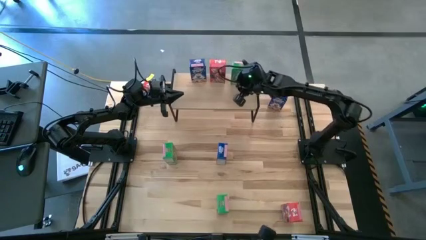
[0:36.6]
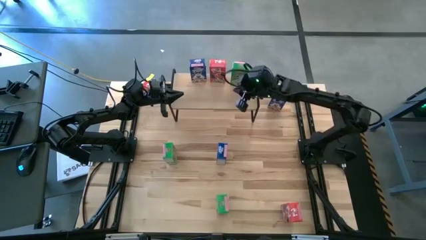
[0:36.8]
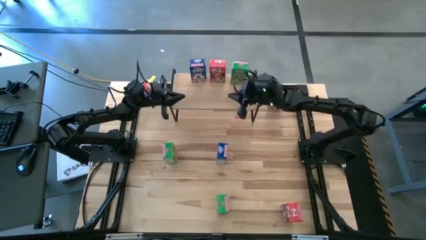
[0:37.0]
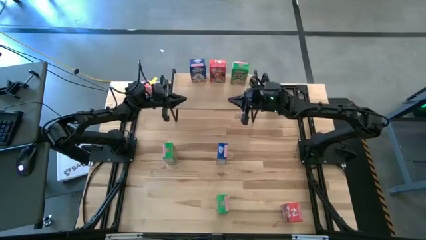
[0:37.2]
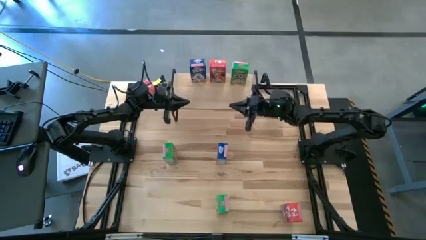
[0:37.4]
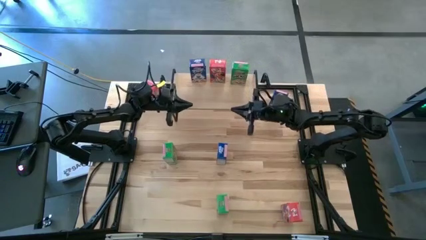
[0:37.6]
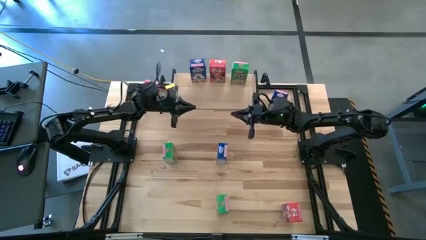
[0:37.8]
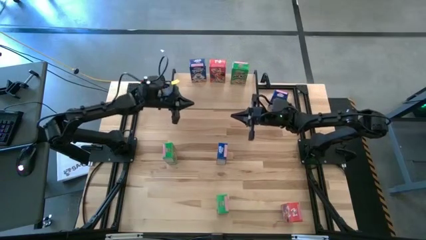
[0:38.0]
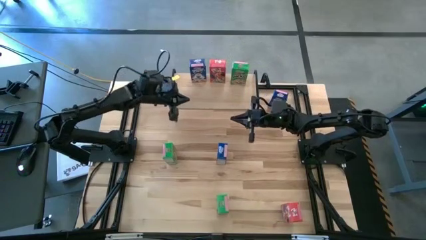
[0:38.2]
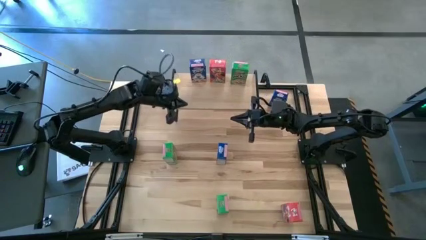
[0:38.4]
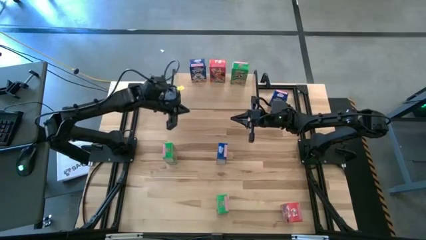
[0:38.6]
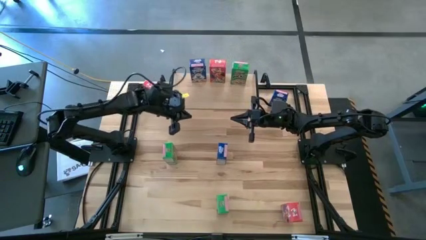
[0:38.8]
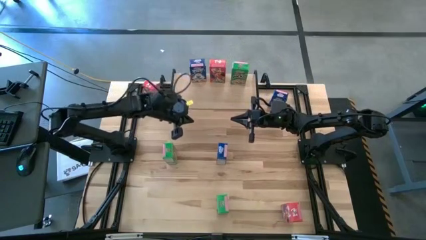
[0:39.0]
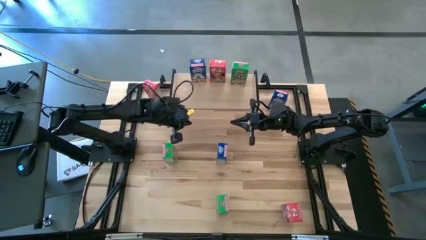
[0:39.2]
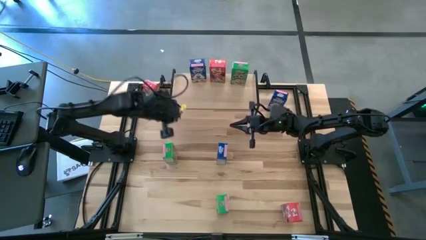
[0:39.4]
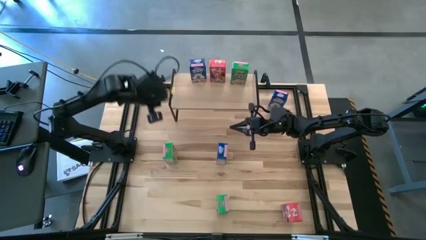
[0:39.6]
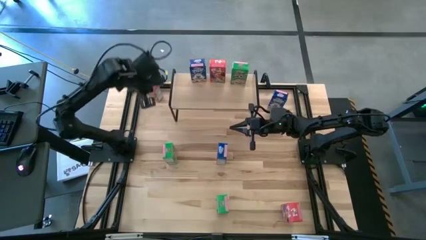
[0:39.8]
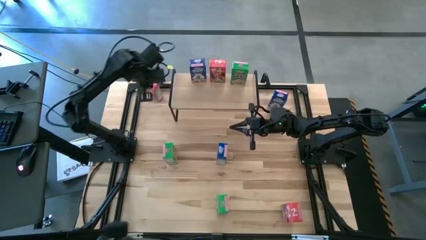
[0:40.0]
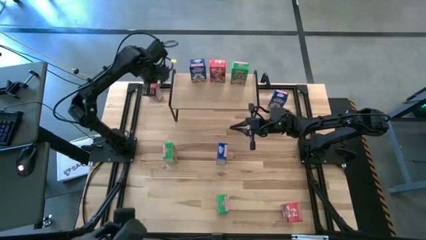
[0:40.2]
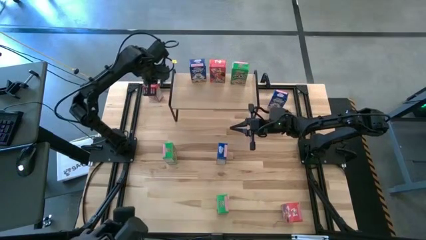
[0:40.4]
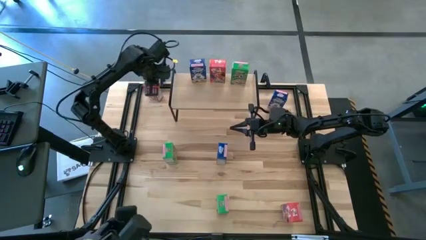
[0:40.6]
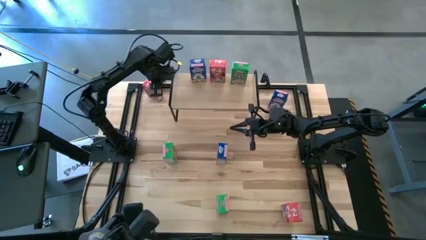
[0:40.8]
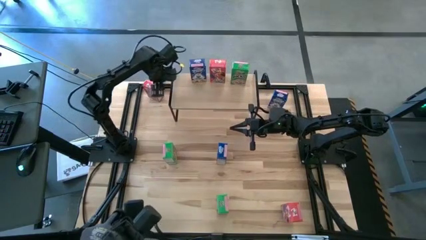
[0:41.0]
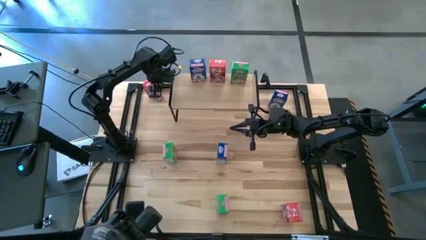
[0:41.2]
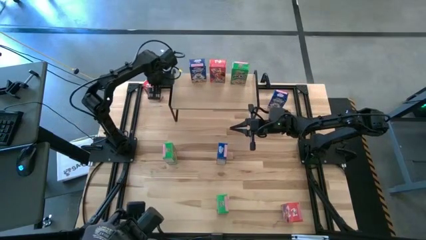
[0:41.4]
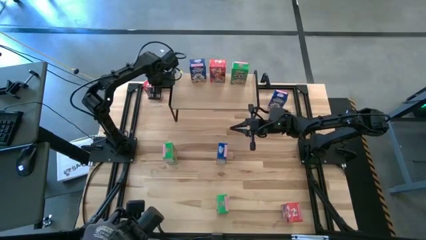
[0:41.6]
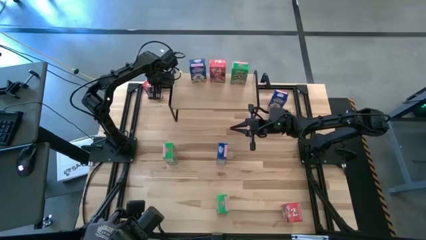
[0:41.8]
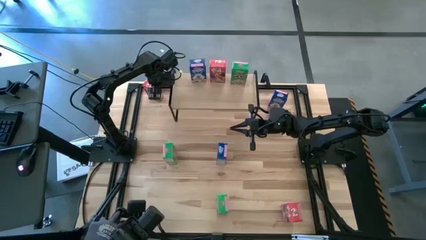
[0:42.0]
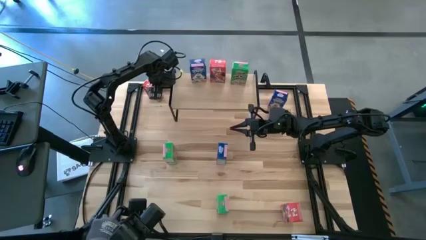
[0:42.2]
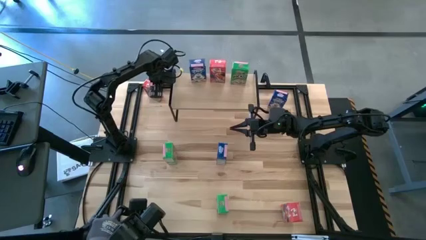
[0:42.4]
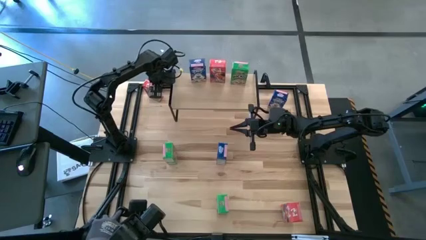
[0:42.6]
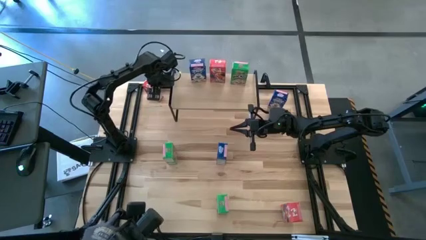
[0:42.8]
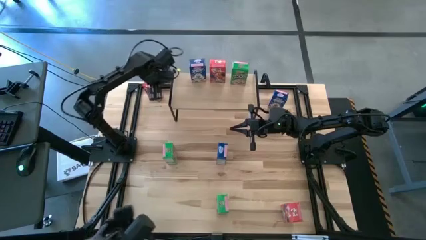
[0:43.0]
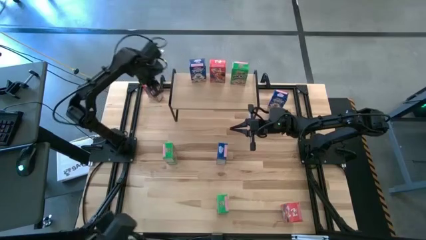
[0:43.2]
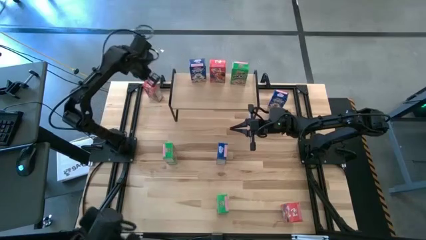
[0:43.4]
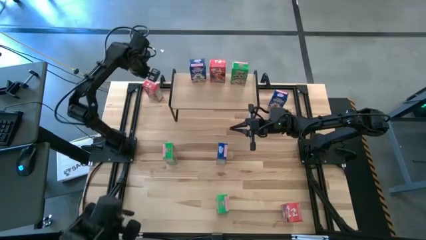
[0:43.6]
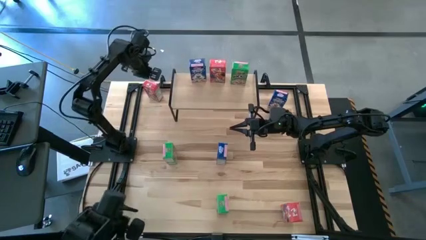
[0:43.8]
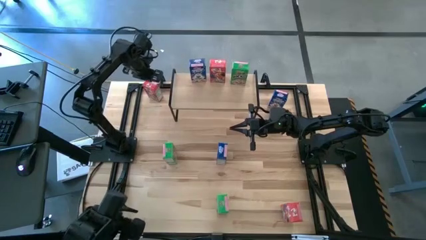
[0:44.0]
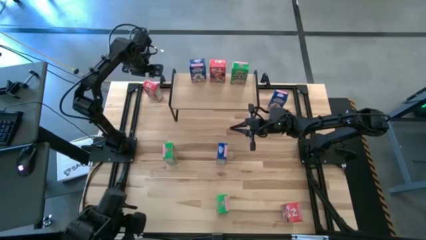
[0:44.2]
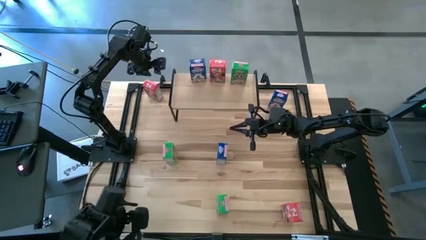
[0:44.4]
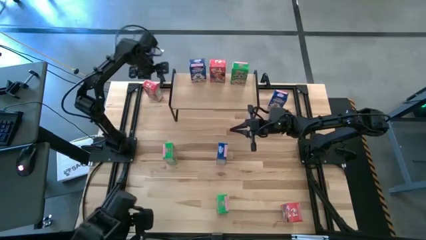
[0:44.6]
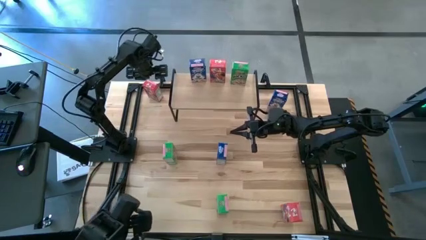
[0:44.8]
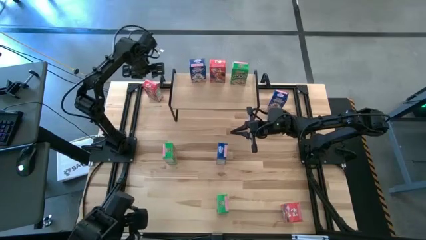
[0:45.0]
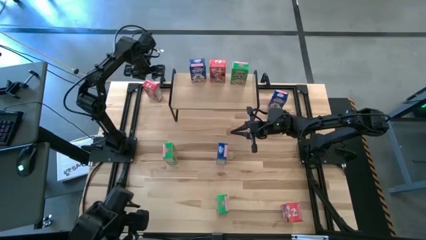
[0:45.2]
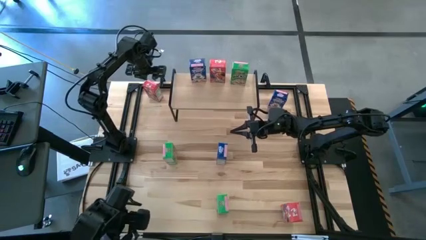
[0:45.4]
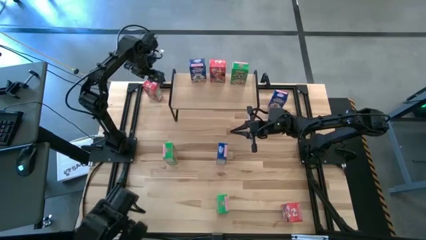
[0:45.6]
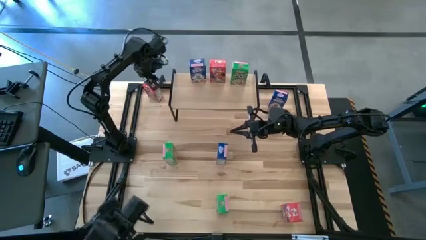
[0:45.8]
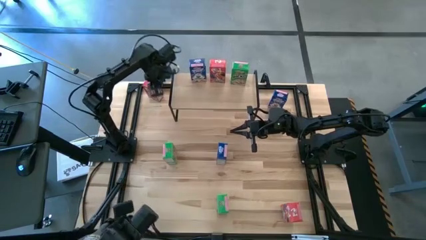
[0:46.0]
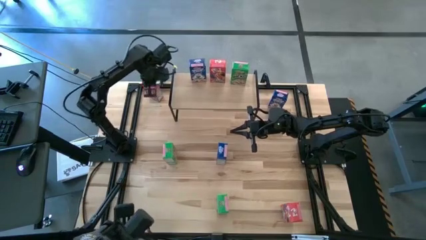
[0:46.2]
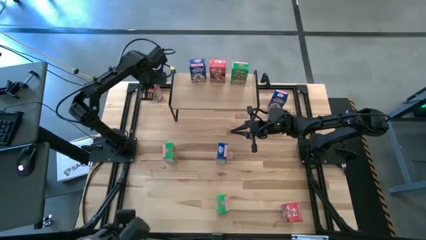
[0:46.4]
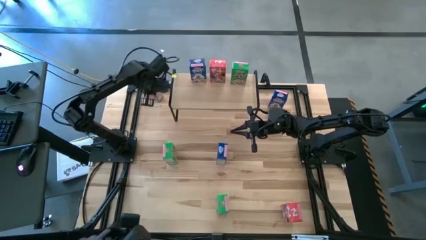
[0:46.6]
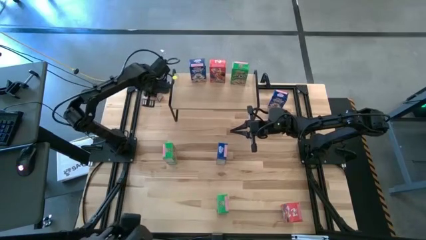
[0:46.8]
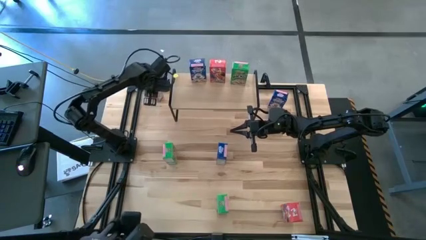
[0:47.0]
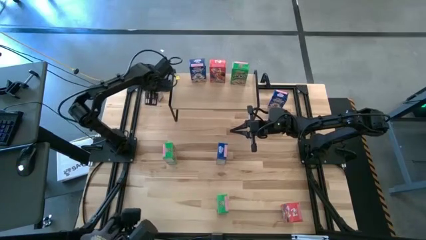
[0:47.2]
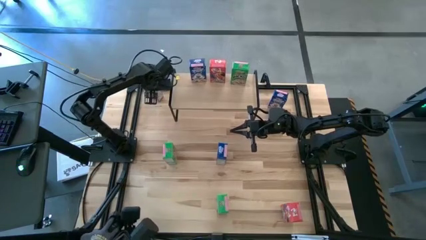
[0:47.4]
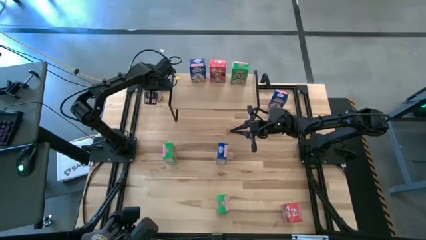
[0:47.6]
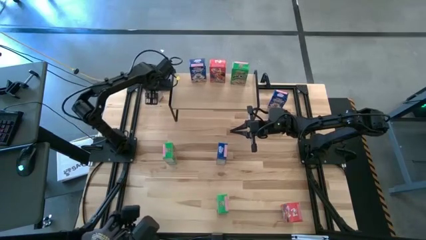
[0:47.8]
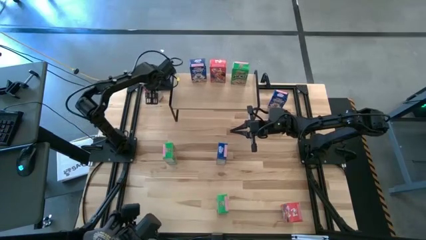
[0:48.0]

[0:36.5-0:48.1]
Task: Stack cereal on shelf
Put the top red cereal box aligned with the other red cereal box on the shelf
